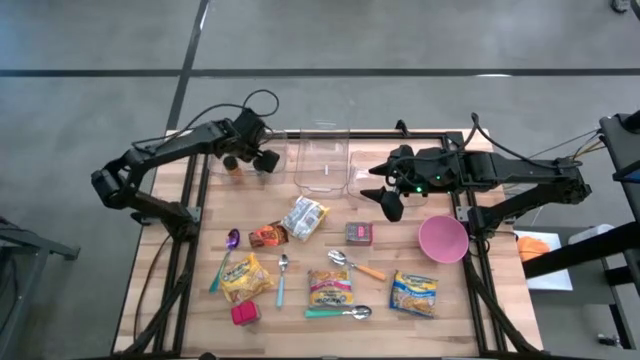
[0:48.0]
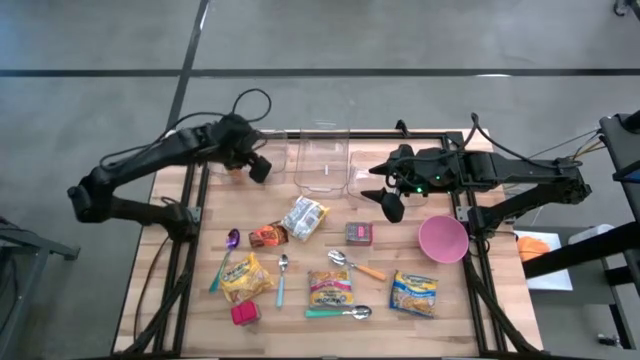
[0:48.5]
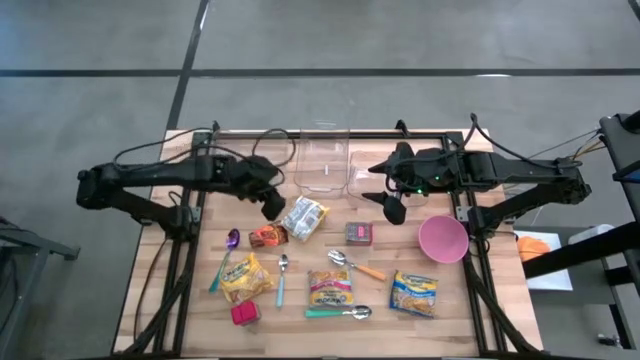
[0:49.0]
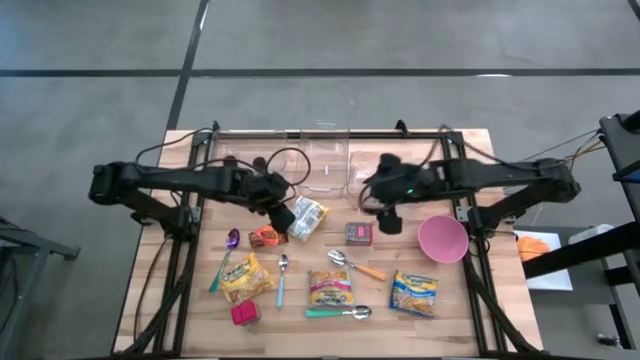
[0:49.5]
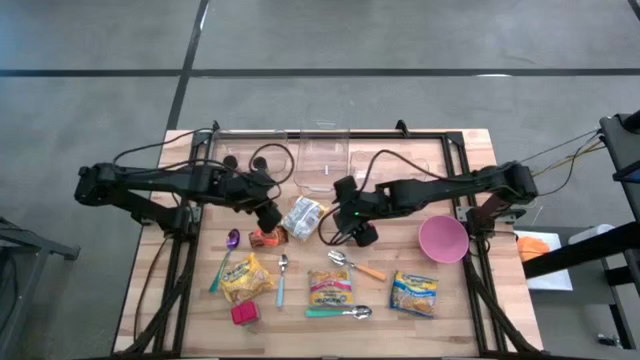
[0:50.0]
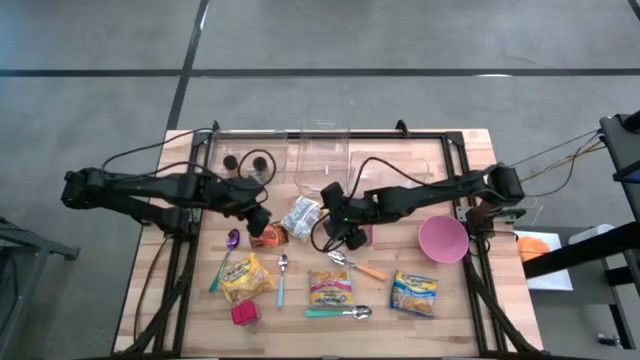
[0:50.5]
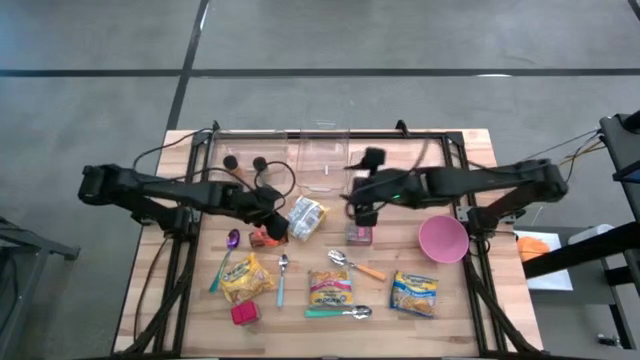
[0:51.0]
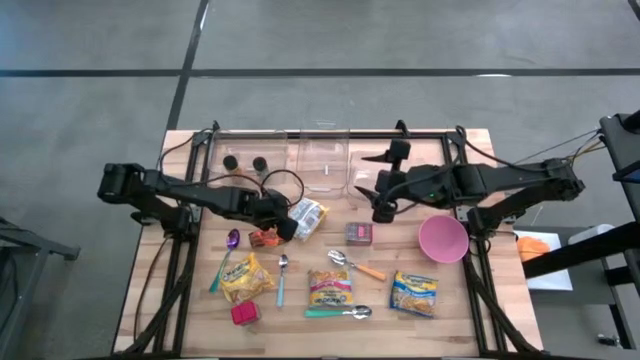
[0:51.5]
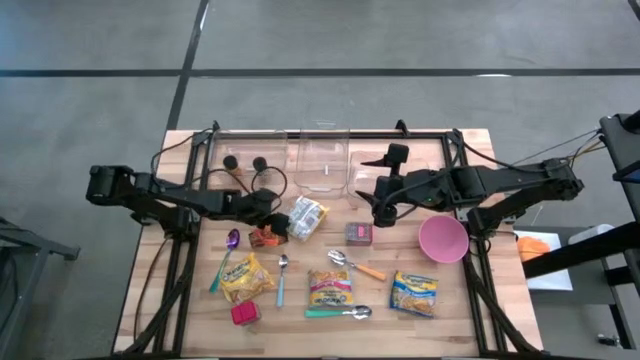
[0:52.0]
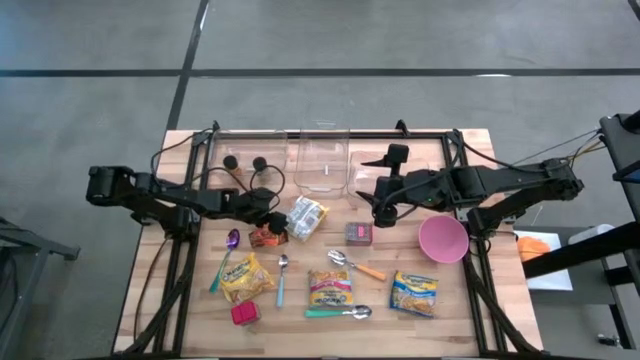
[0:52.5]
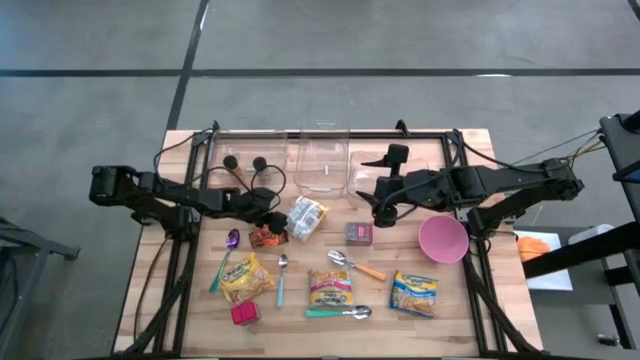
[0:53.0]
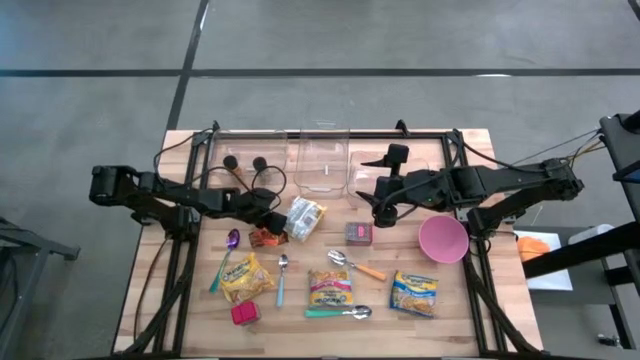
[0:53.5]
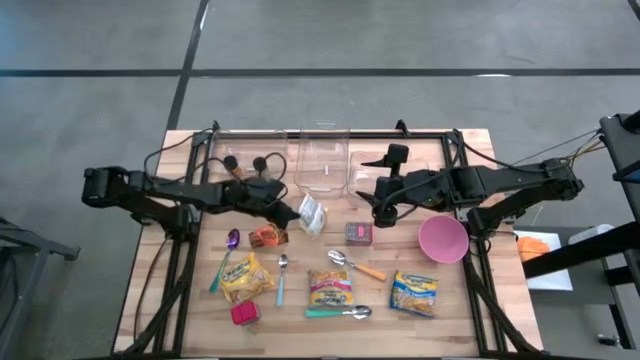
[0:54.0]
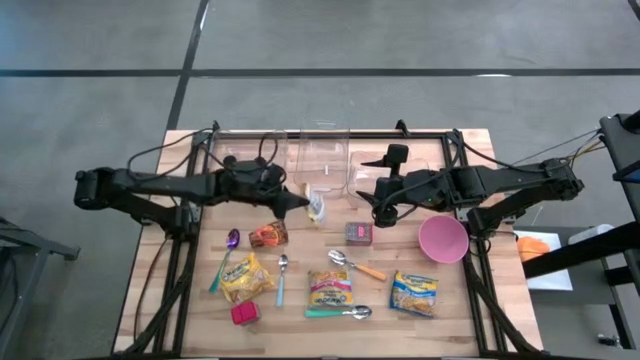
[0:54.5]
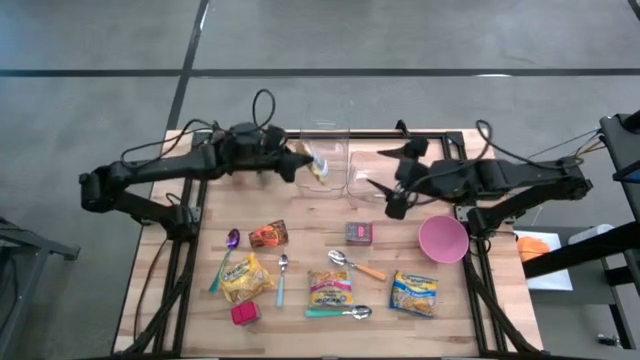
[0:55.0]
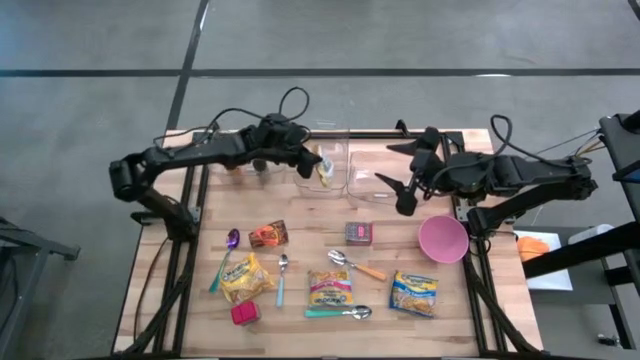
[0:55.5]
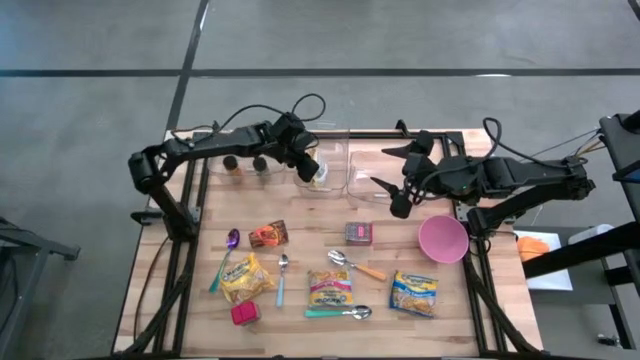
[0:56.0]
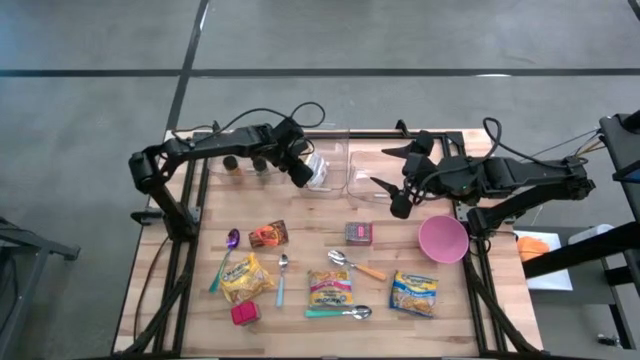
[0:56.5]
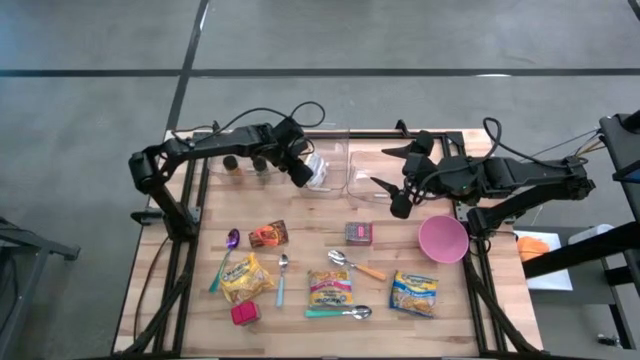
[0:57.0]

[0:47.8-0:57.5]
Put the top yellow noodle pack into the middle transparent bin

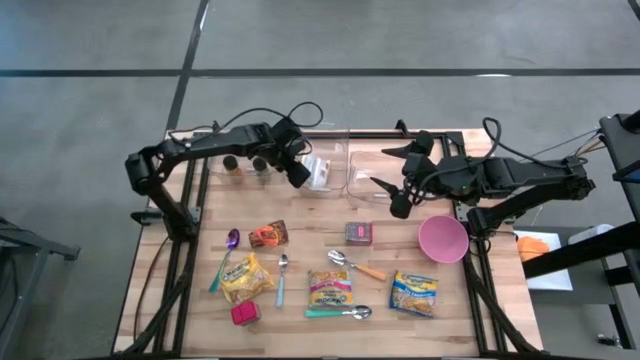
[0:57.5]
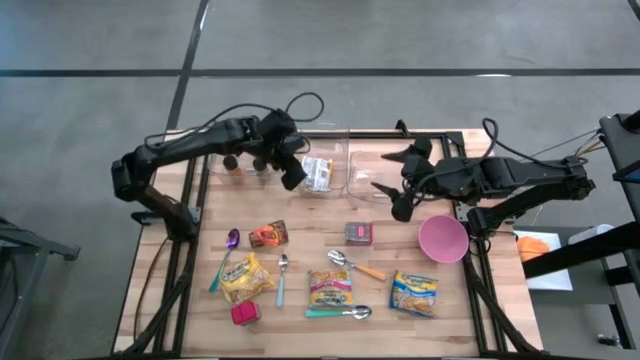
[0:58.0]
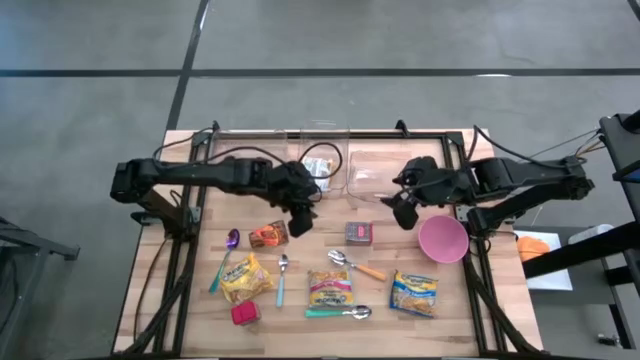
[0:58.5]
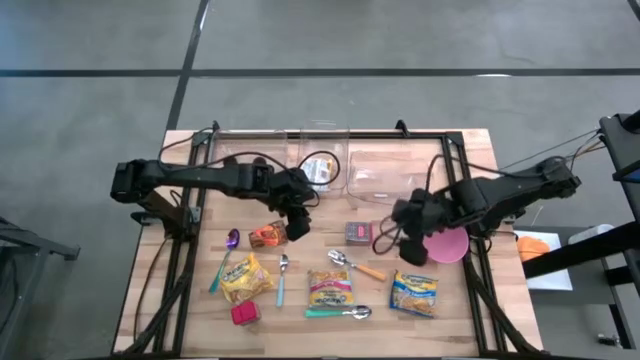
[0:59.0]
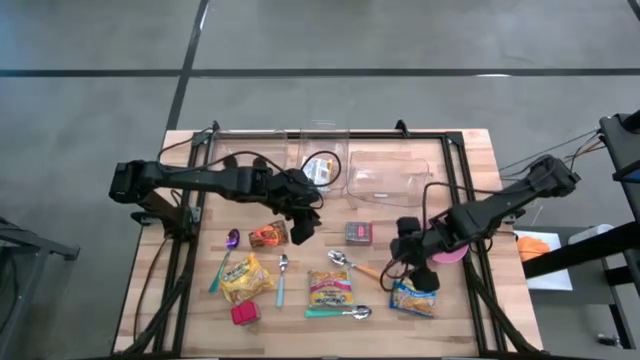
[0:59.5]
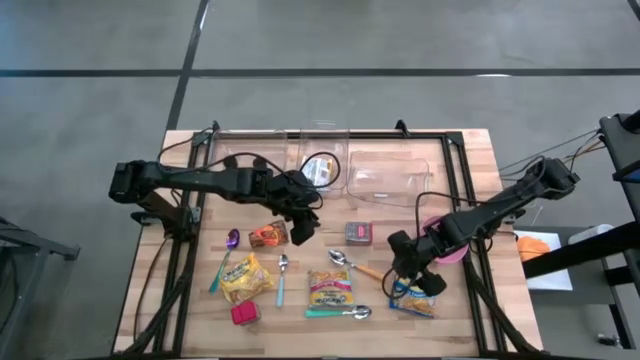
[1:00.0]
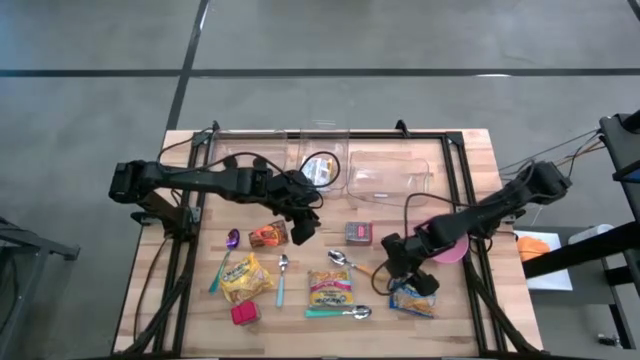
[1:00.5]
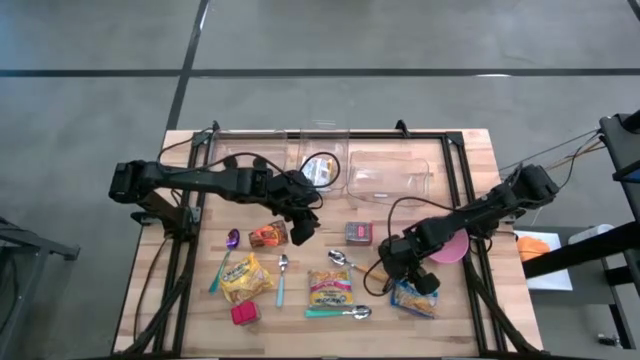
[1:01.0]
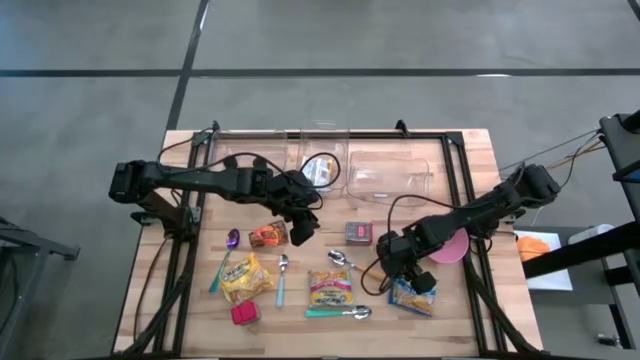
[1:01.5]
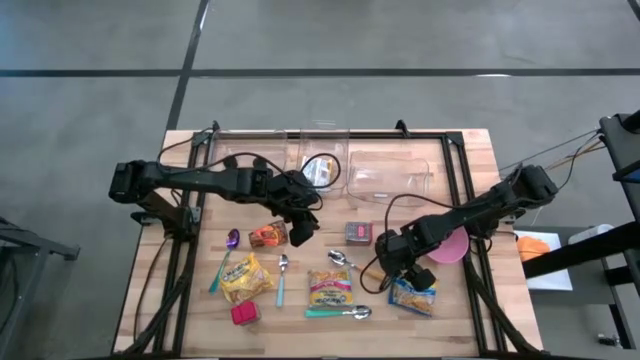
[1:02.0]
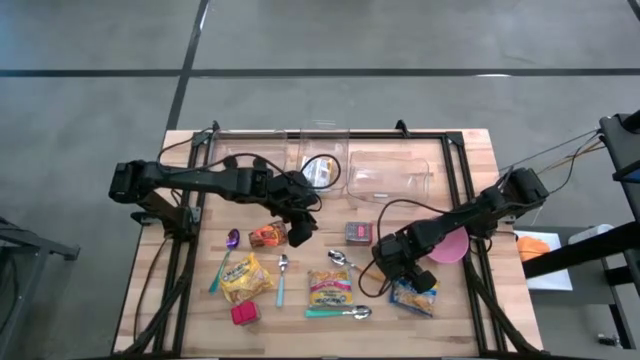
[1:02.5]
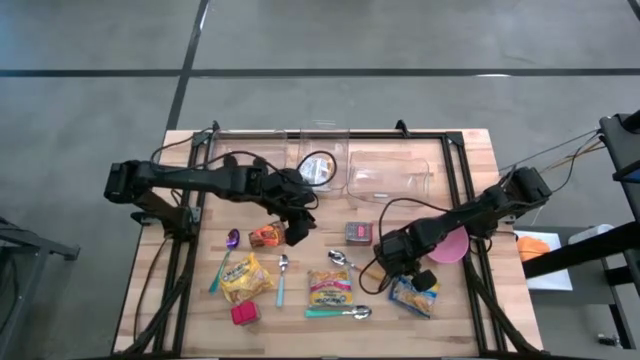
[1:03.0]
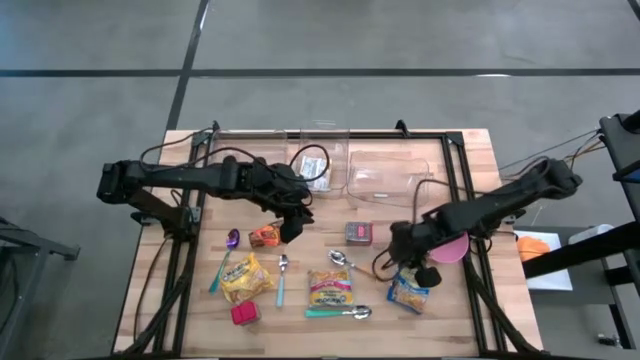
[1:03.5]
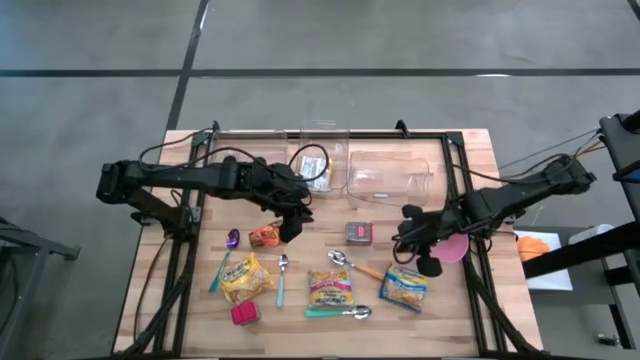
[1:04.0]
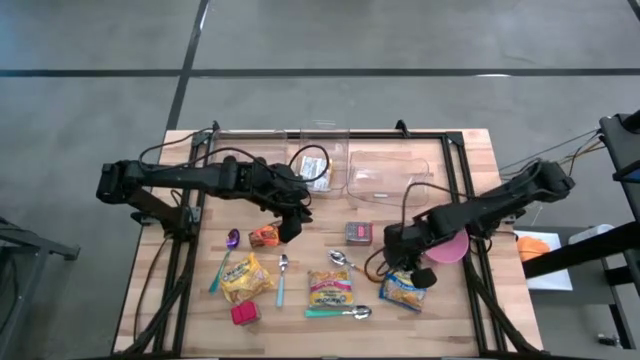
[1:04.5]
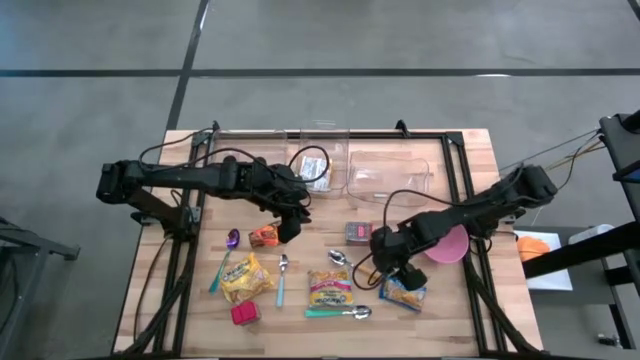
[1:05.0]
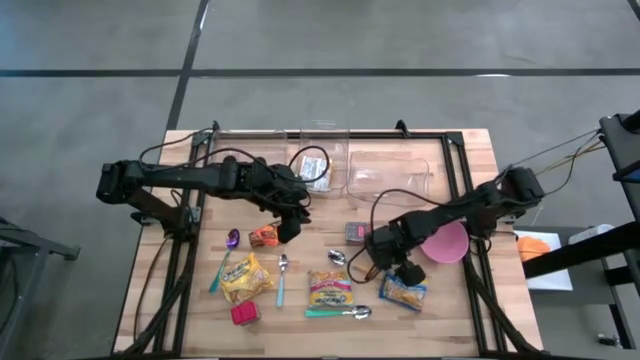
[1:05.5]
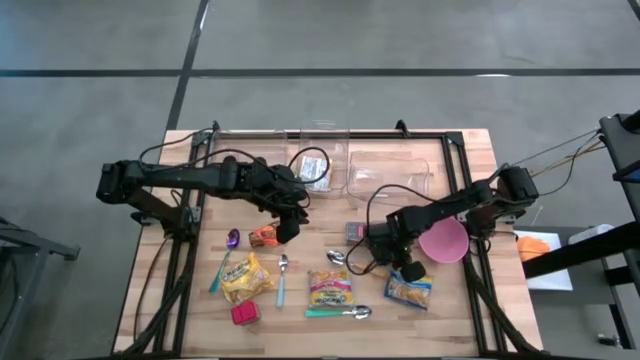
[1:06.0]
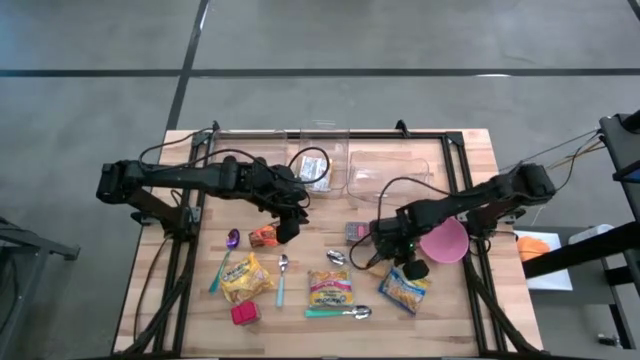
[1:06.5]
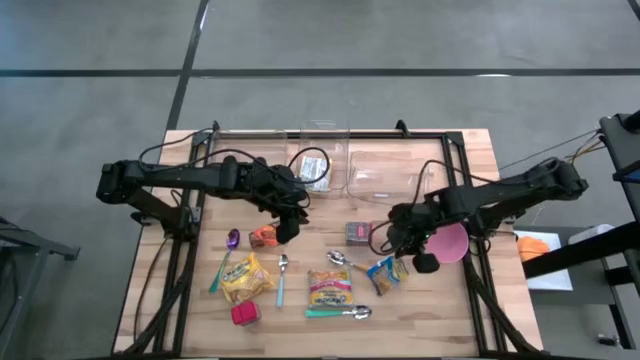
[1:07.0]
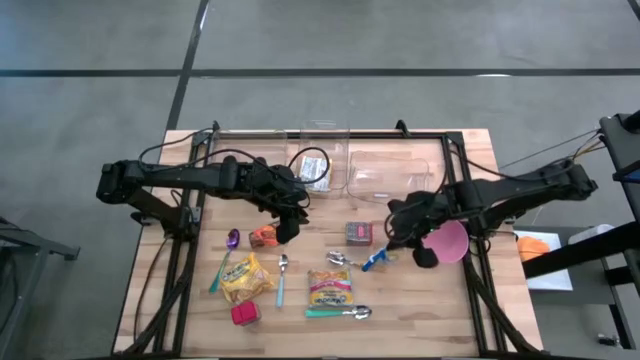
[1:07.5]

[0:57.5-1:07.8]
Put the blue noodle pack into the middle transparent bin

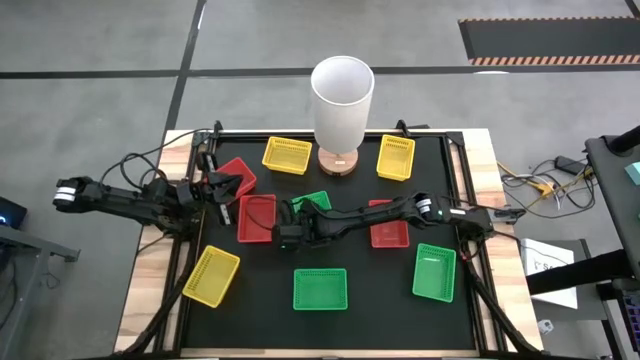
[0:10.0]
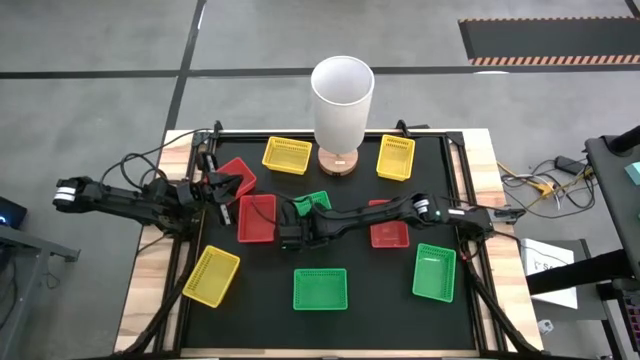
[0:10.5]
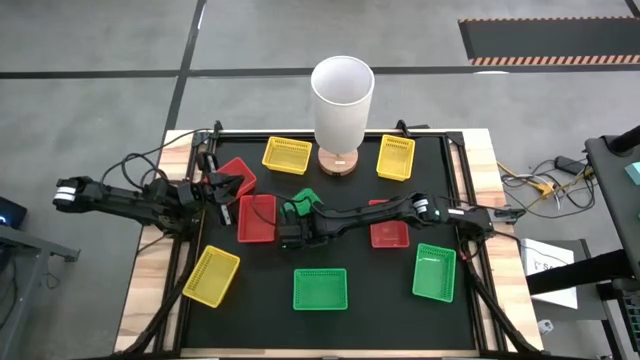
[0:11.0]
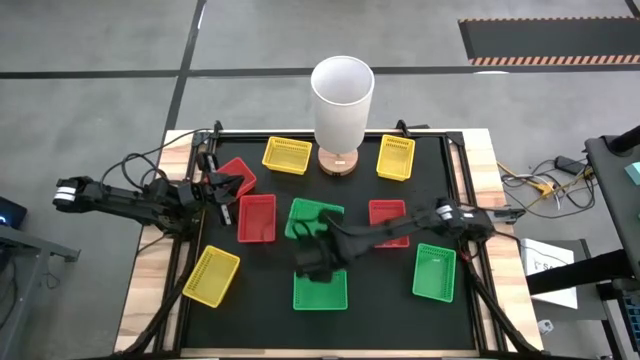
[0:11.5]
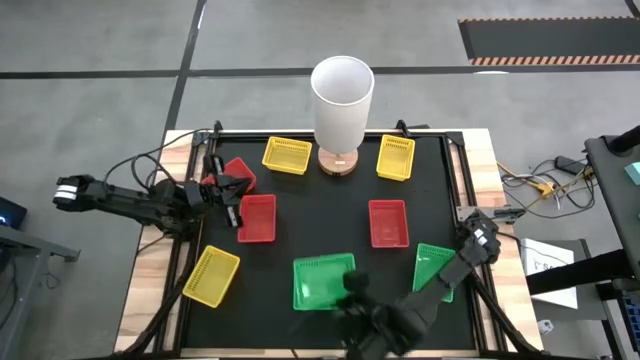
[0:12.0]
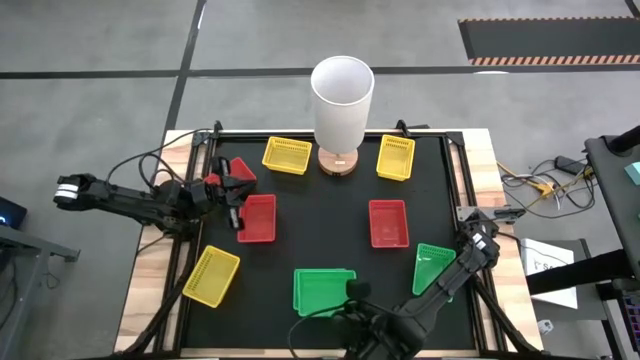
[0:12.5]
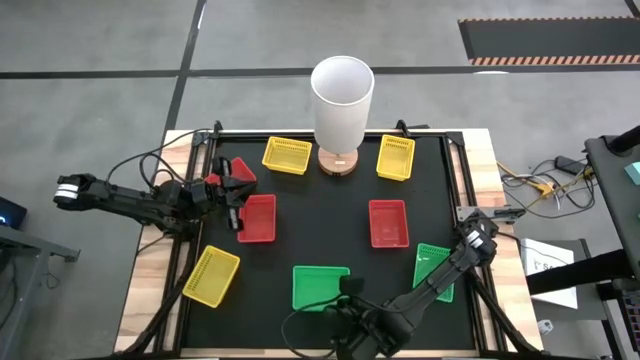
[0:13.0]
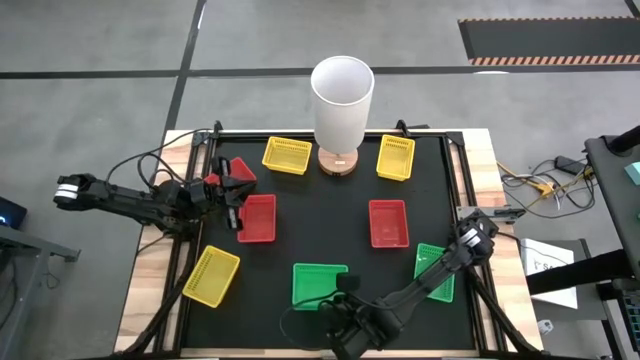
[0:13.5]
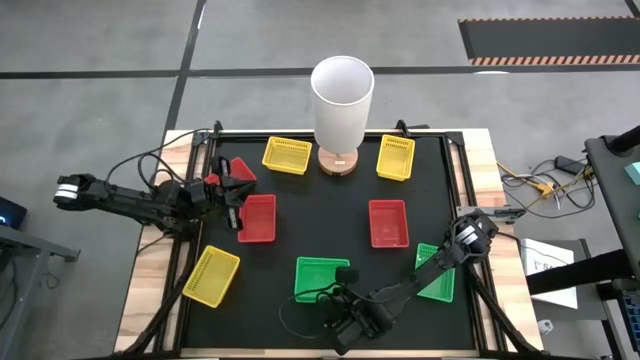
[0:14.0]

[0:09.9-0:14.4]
Stack the top green bin on the bottom left green bin
